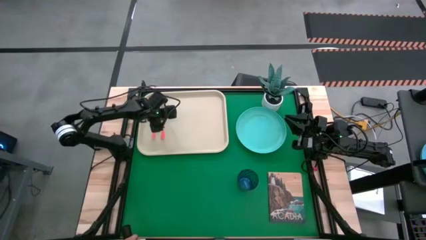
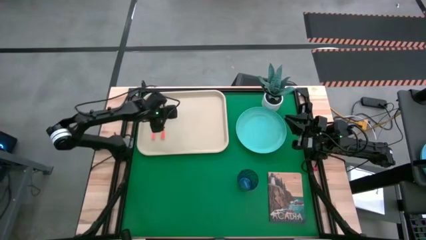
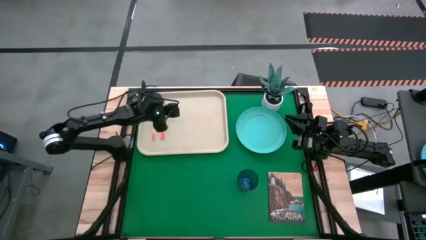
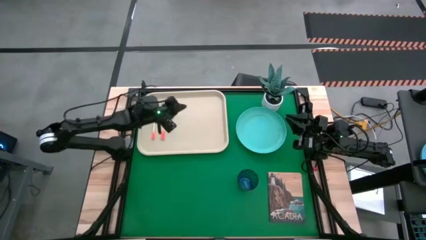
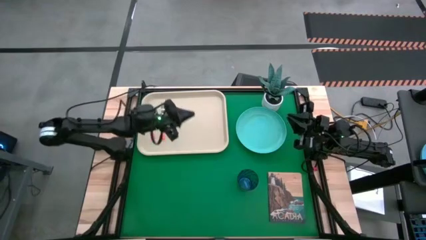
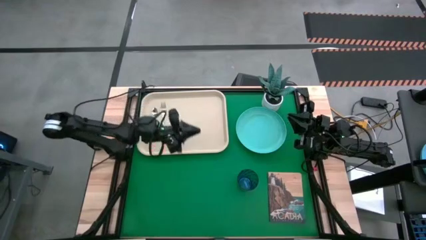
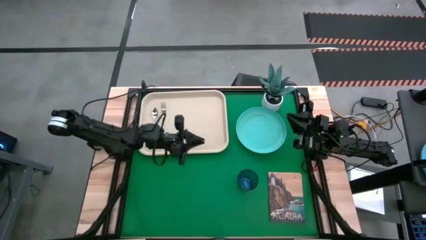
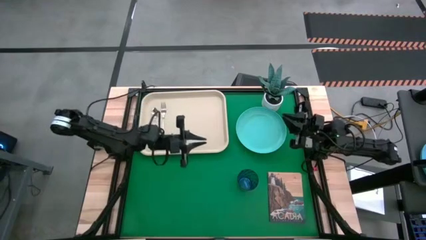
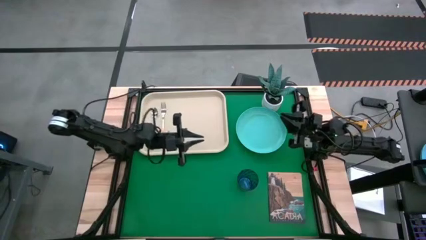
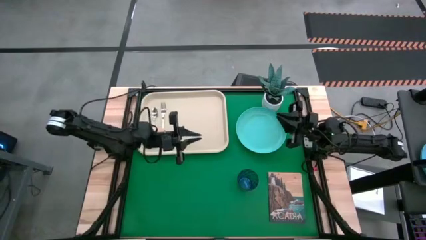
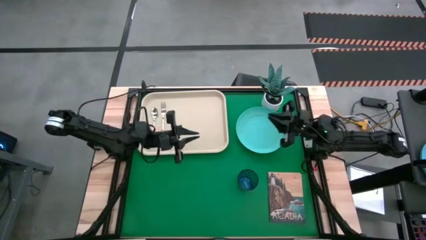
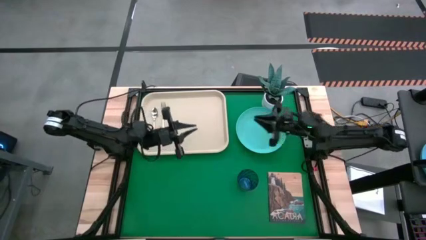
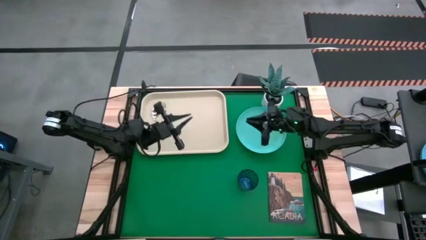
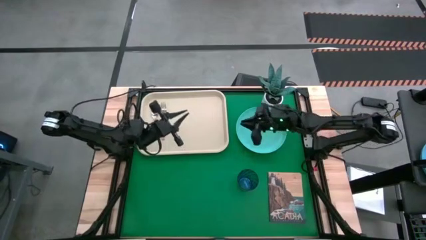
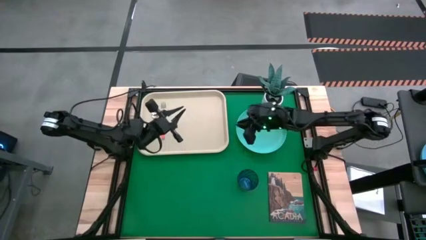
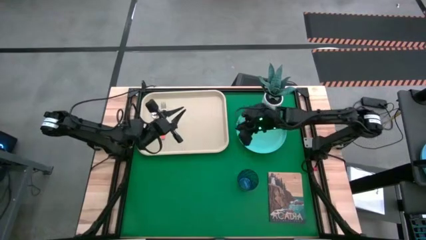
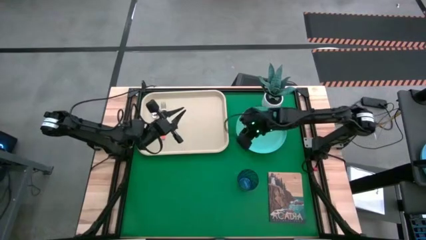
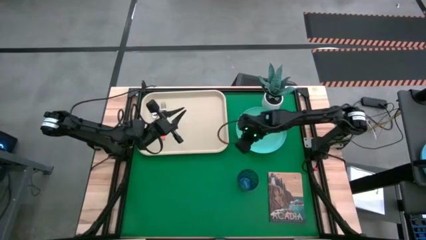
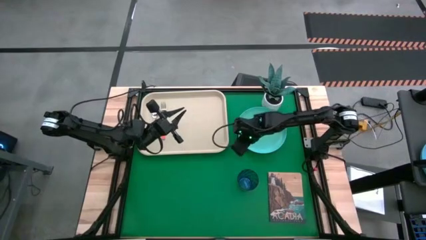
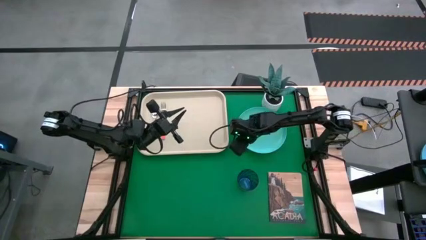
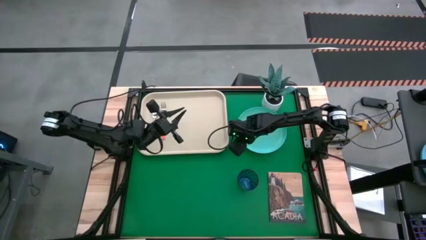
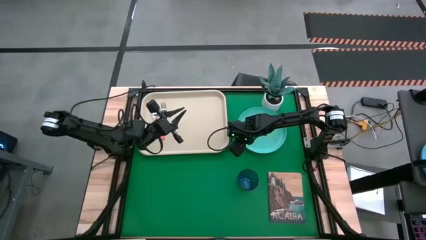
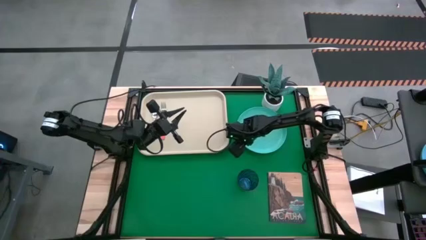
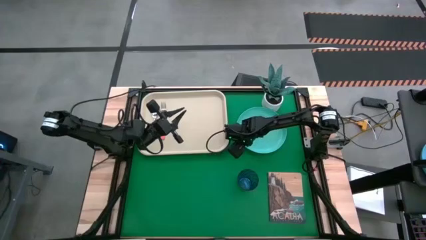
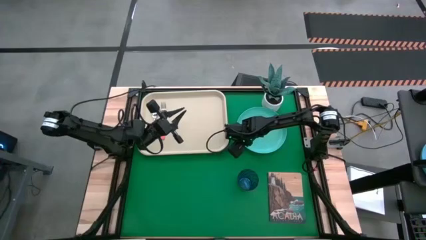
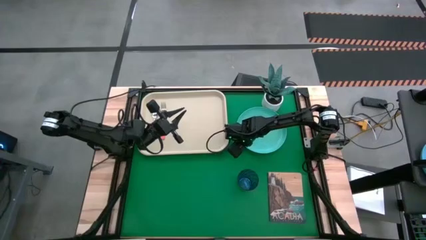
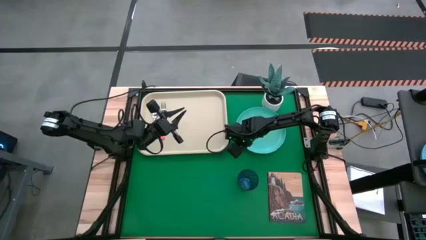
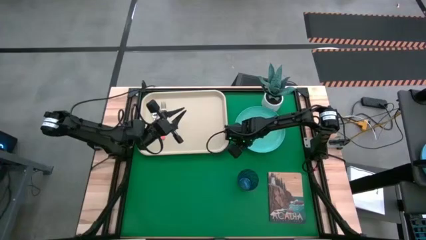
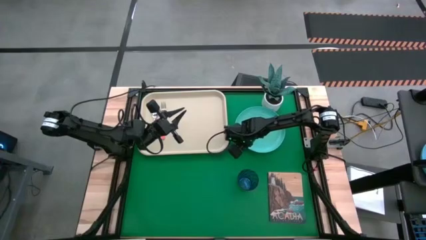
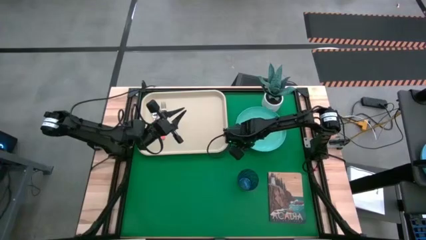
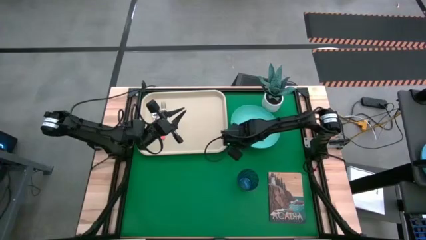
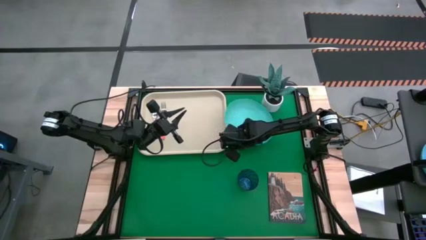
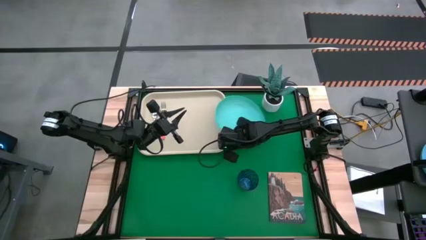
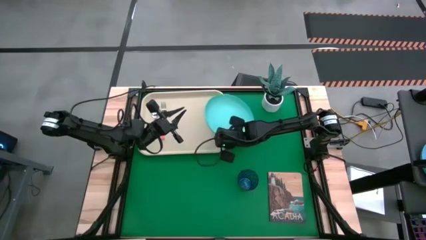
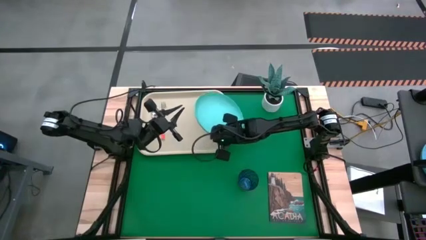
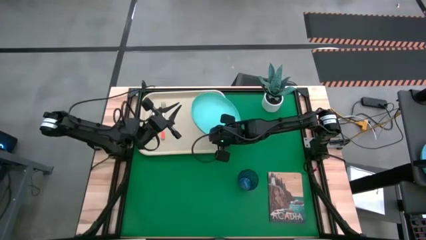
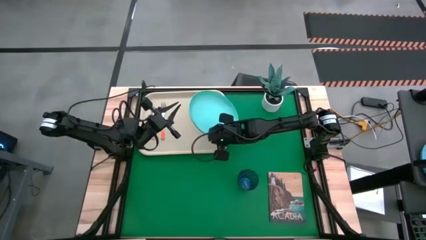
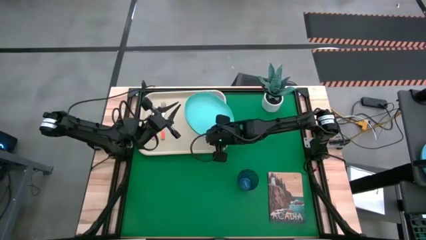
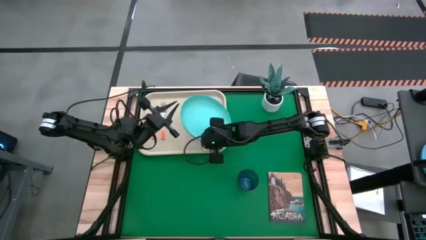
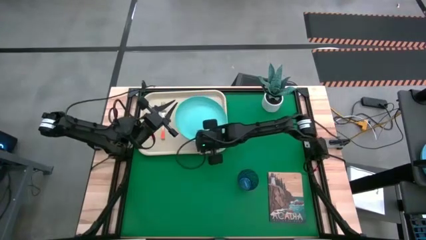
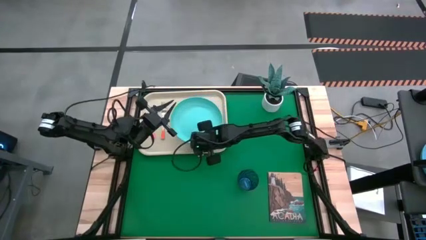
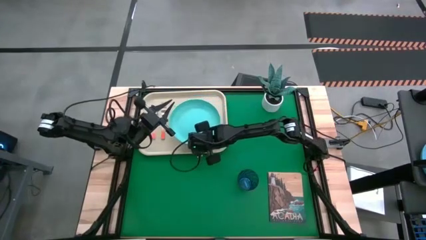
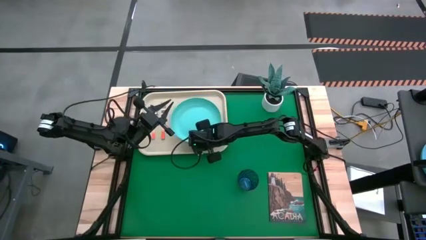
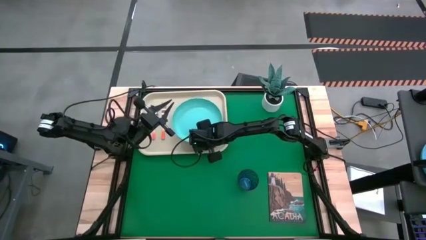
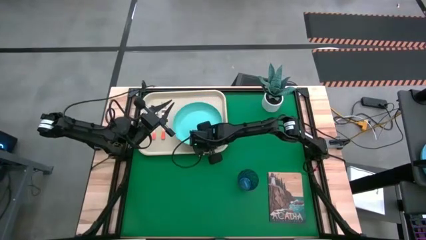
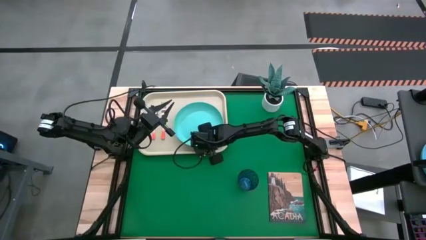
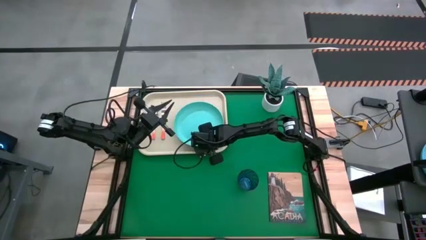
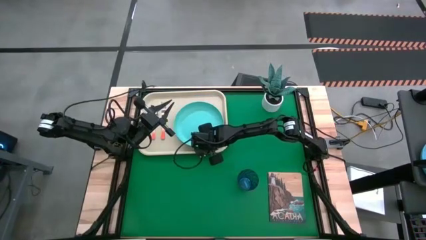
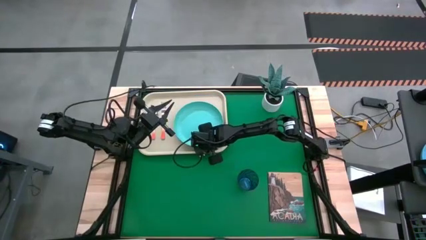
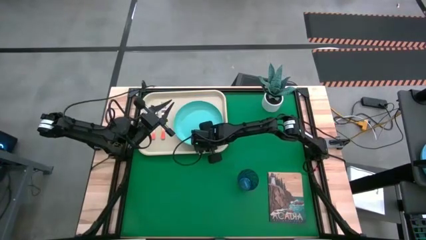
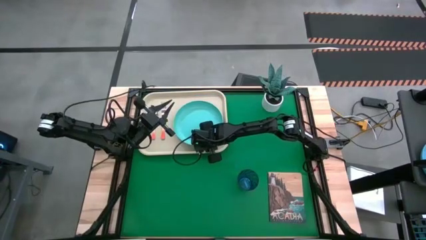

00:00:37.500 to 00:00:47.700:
Task: Pick and place plate/cup/fork/spoon on tray
Put the blue plate on the white tray to the right of the orange fork
